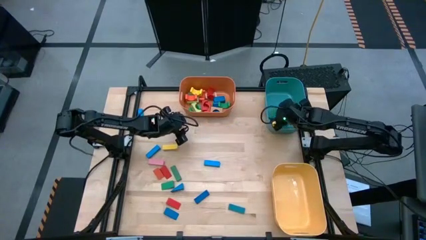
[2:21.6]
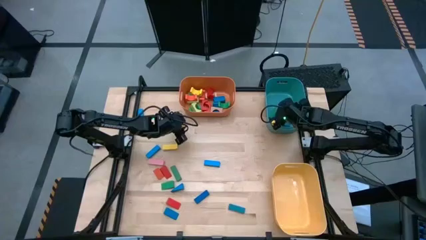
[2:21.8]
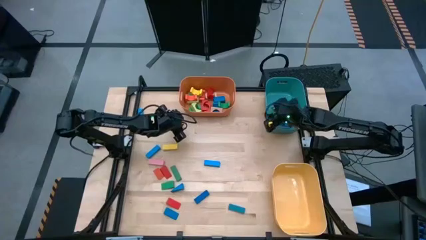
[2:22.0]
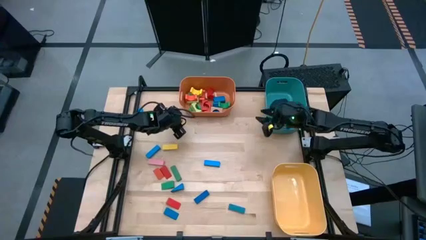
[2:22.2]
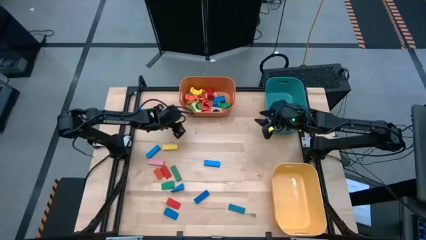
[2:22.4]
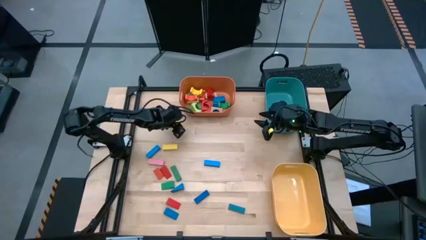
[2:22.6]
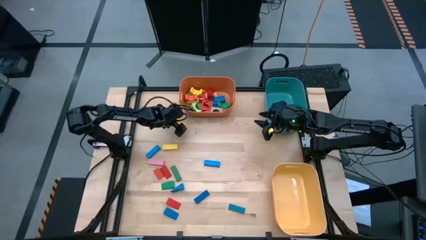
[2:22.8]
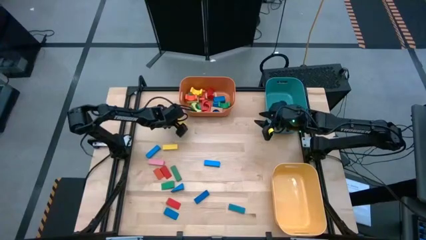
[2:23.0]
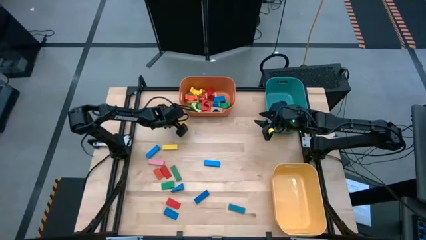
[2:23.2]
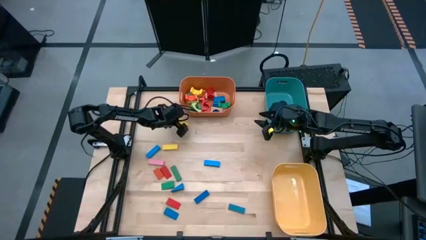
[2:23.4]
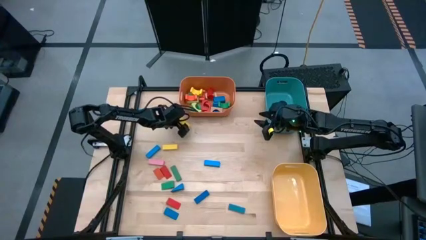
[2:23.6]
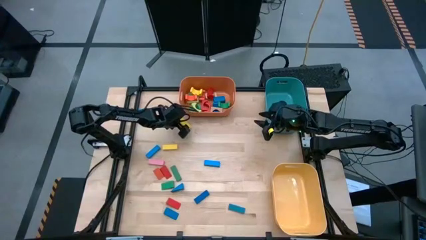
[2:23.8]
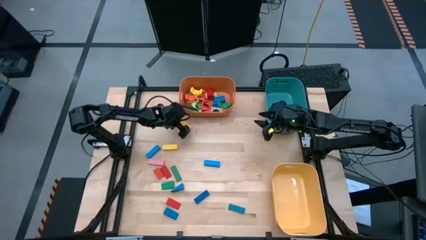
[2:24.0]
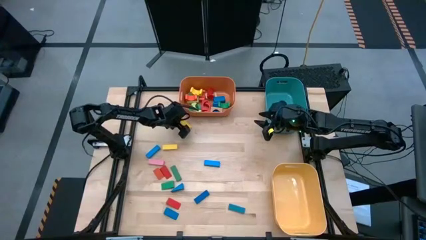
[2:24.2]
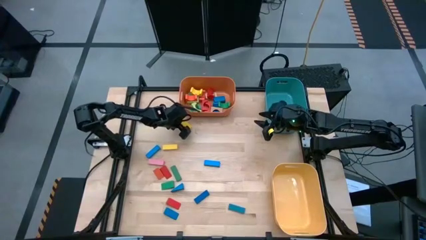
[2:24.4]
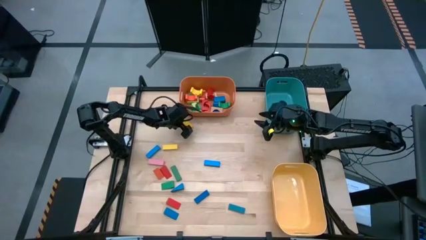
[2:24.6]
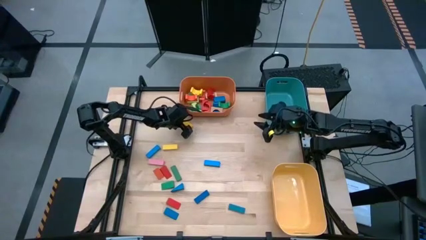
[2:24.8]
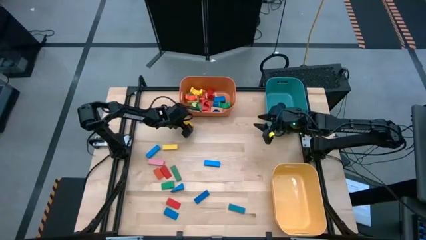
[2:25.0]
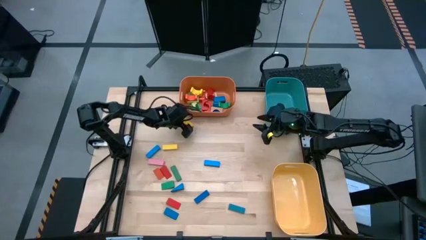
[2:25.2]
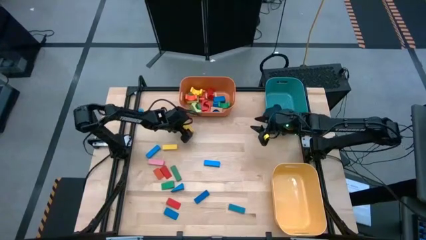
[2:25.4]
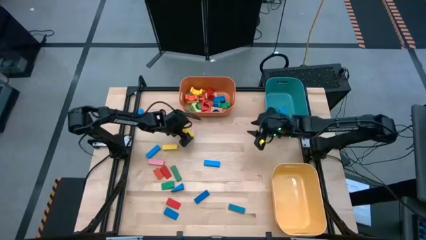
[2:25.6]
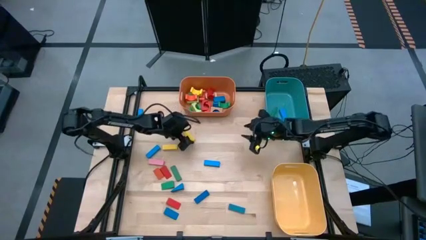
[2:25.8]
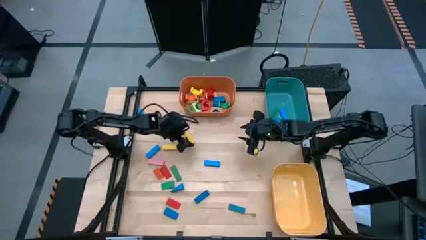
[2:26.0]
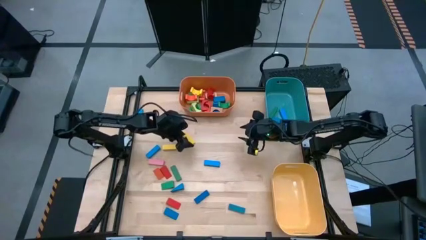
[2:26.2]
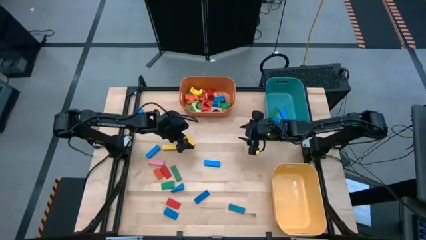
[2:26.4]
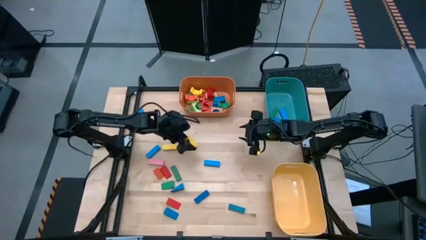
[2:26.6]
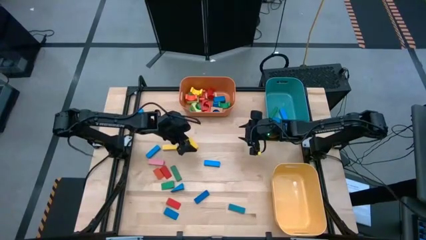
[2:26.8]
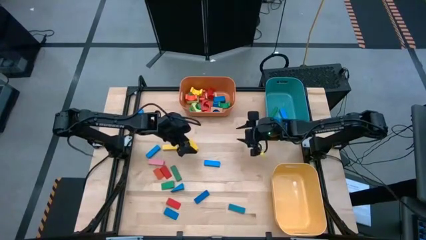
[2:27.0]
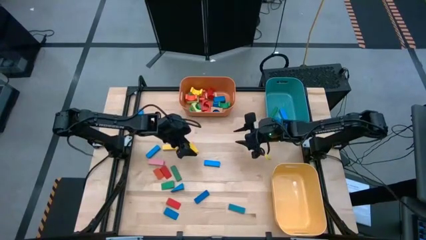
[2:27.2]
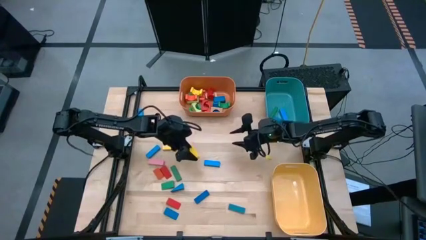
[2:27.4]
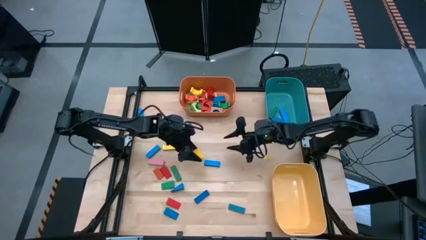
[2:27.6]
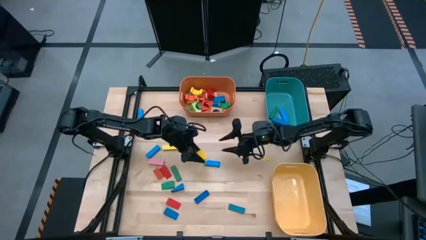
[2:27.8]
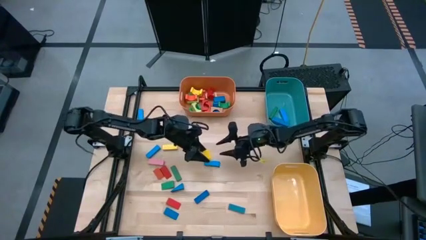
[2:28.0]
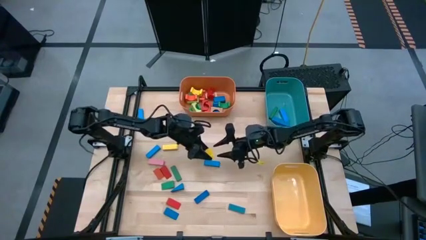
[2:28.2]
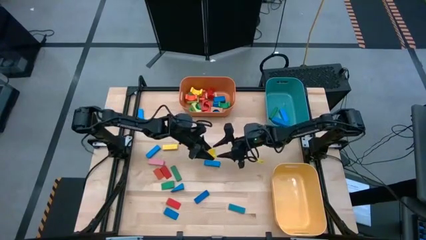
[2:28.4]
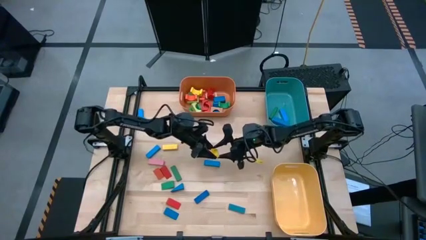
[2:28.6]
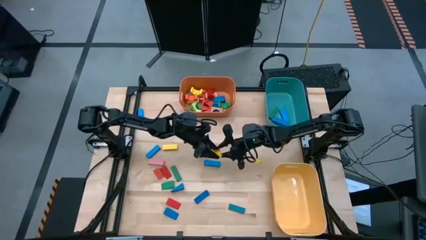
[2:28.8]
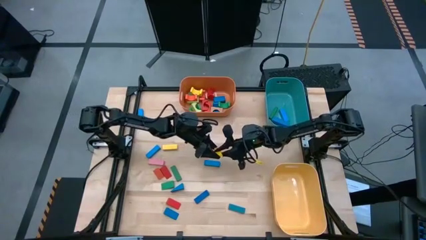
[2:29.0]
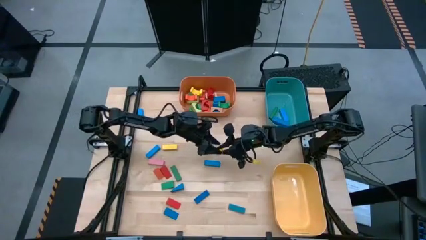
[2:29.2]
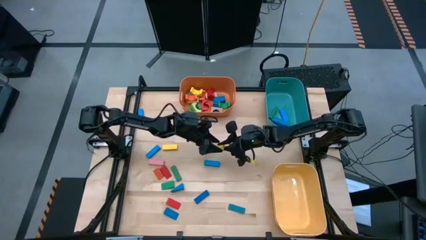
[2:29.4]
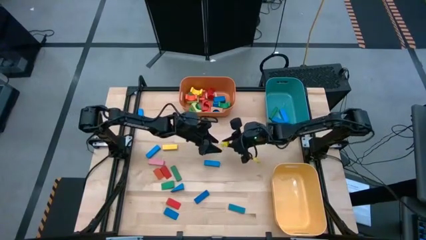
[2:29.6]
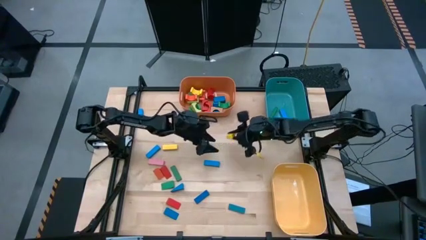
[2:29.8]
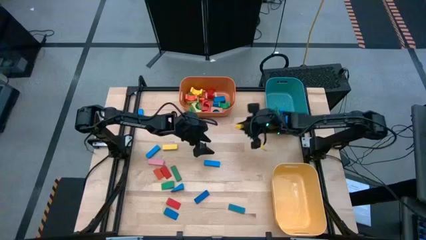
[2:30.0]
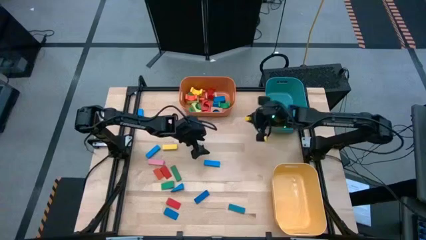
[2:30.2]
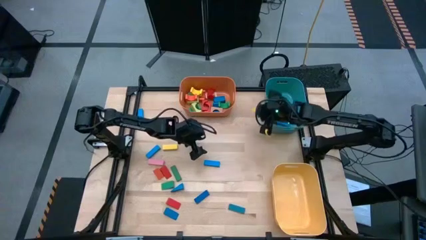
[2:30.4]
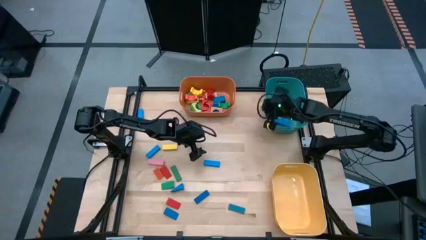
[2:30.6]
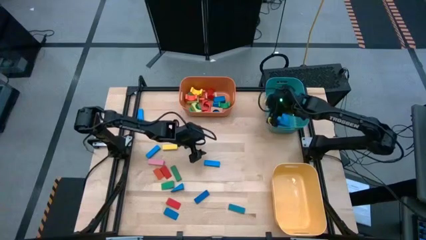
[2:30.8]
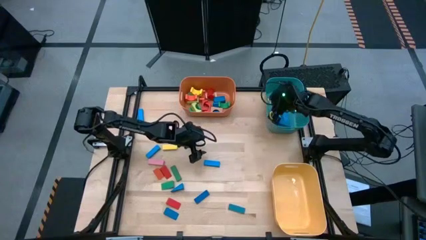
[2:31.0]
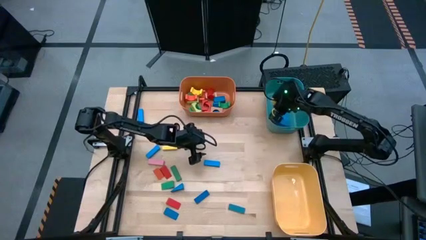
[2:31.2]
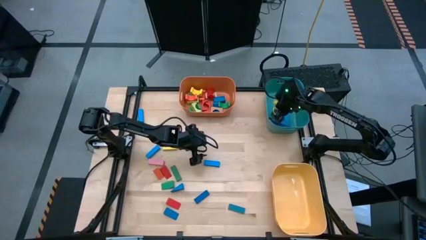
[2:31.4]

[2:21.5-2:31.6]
Task: Sort blocks by size
Put the yellow rectangular block into the green bin

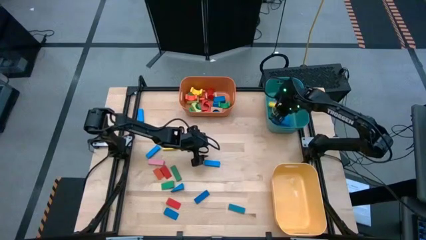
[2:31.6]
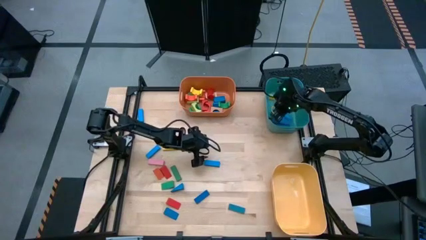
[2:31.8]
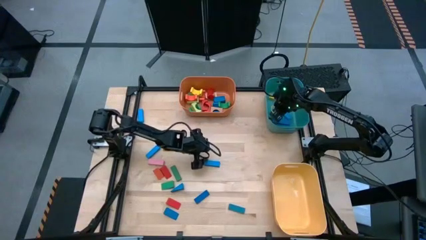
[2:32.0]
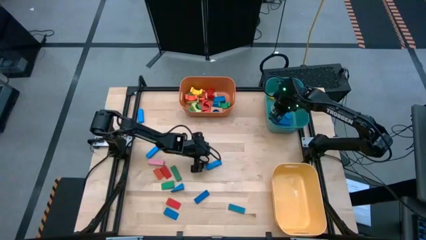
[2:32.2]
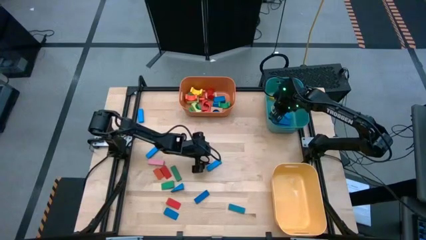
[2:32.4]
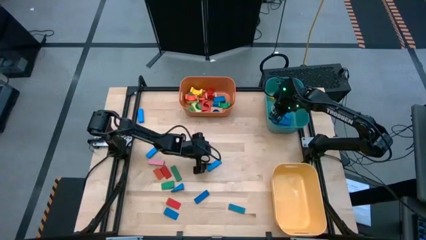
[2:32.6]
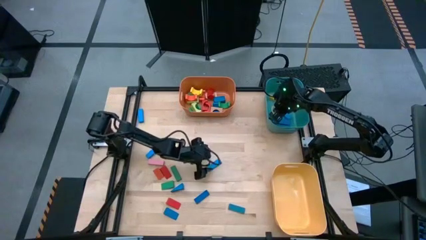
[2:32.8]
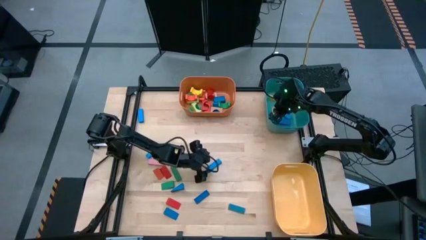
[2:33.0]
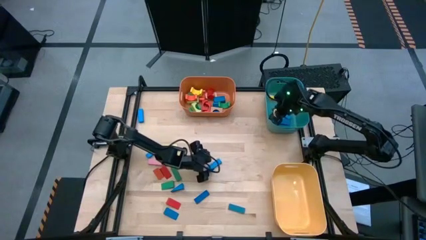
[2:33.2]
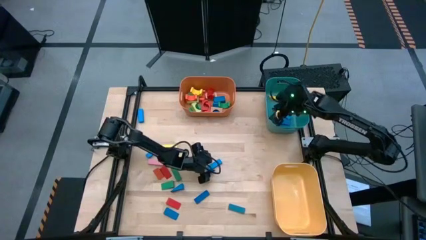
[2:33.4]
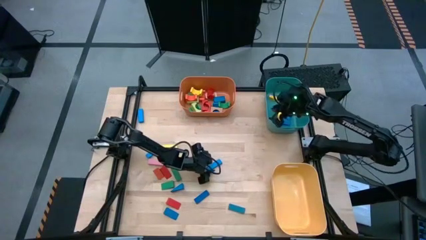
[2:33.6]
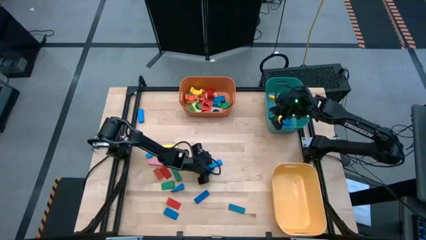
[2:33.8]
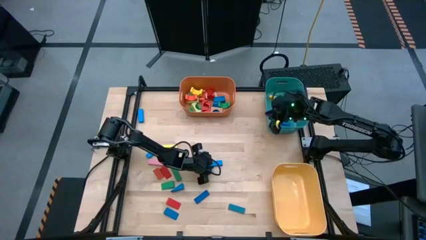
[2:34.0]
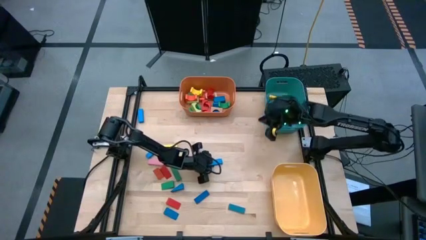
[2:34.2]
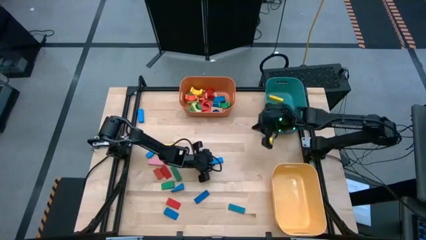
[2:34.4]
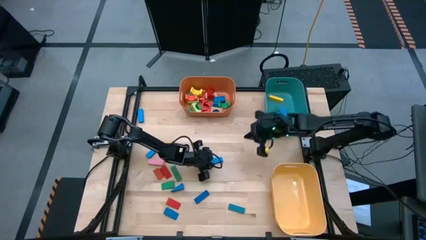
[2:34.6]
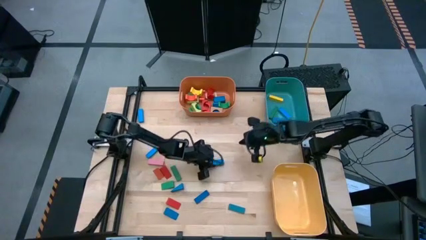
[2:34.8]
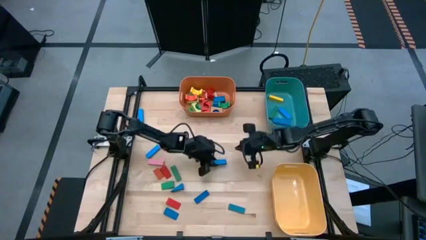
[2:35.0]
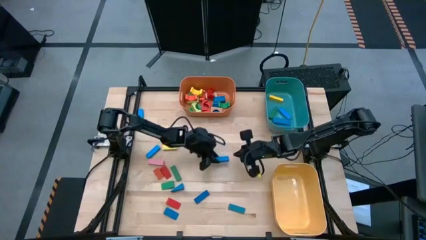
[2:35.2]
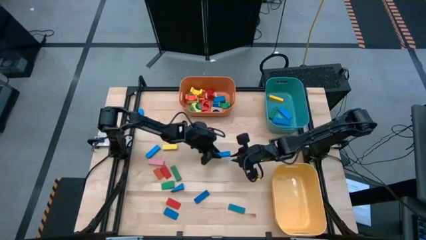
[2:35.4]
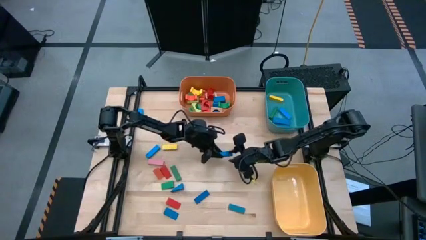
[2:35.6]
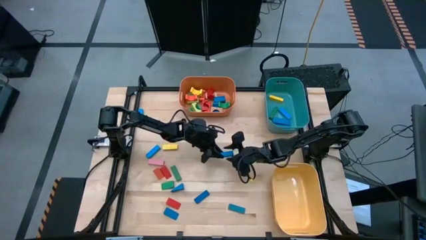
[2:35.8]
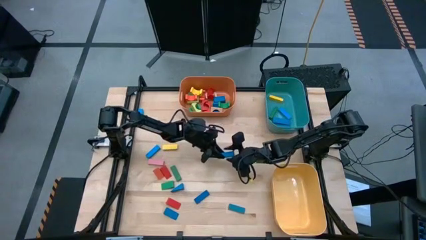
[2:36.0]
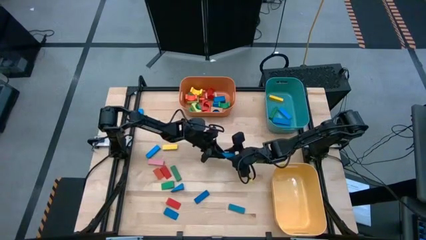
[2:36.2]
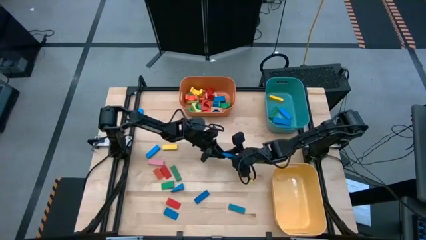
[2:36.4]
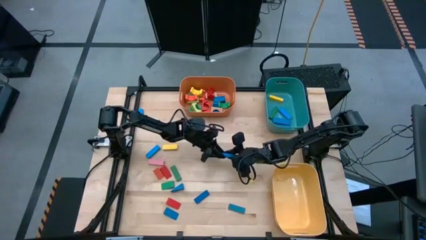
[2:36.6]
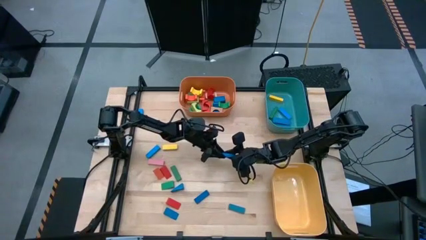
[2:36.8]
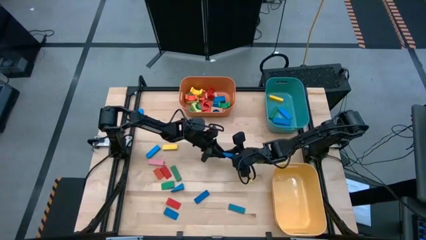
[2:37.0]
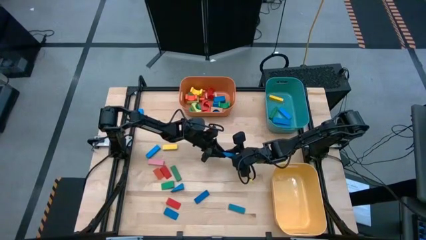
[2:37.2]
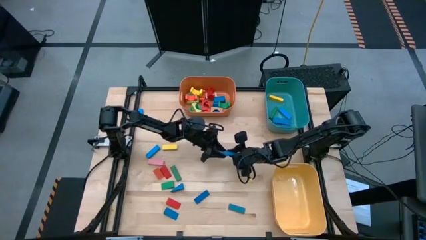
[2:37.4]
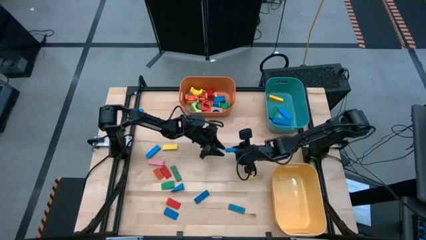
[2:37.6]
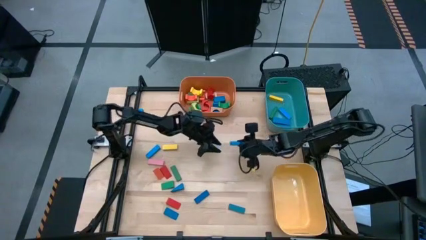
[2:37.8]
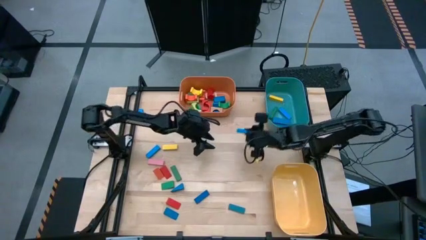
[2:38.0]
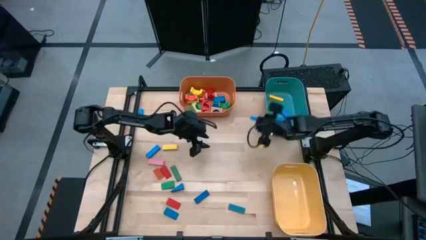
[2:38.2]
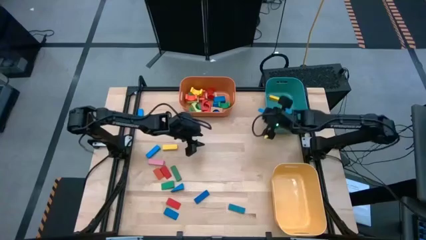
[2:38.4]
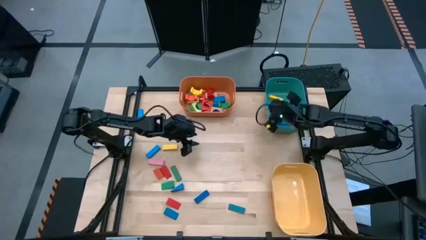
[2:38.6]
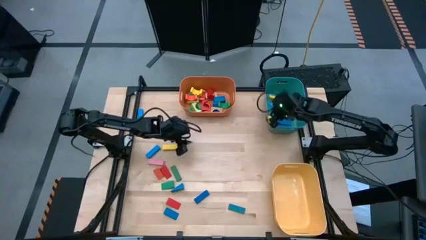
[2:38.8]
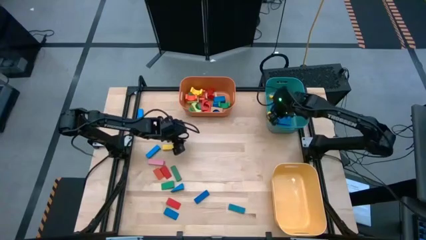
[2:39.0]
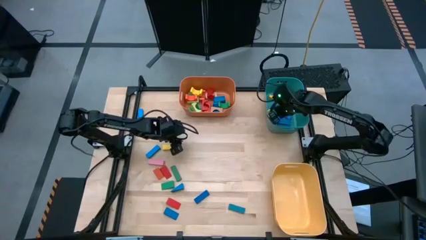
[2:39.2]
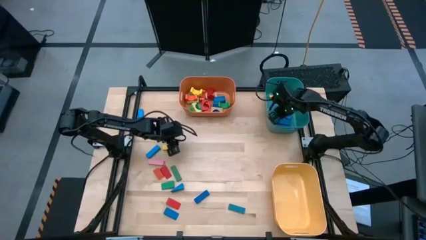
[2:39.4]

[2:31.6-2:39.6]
Put the blue rectangular block into the green bin
